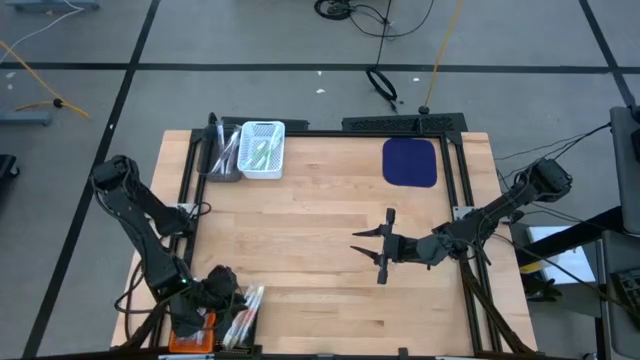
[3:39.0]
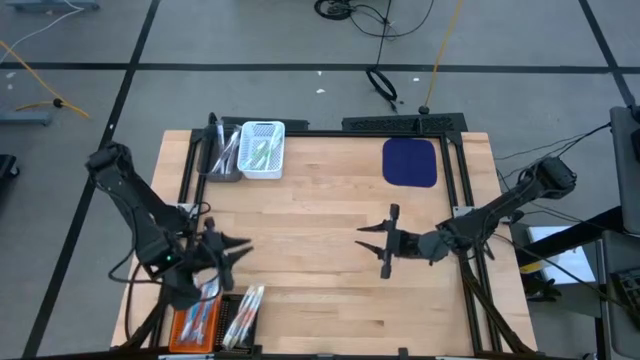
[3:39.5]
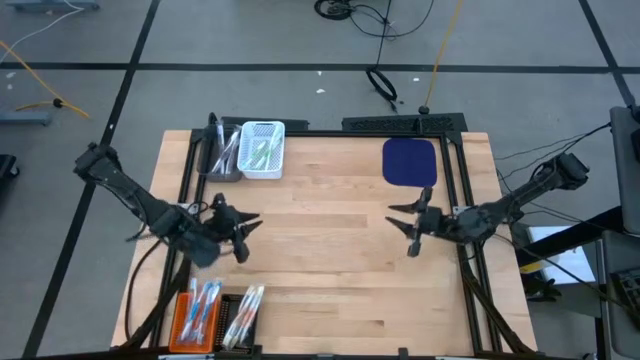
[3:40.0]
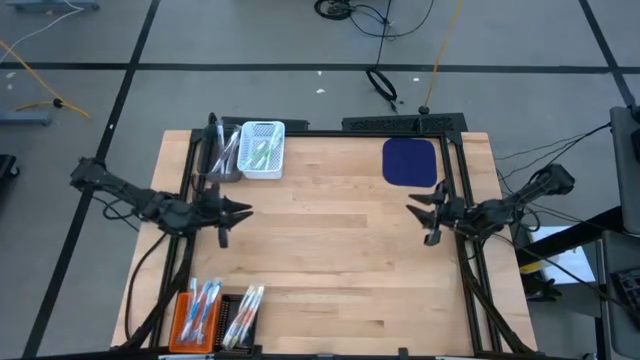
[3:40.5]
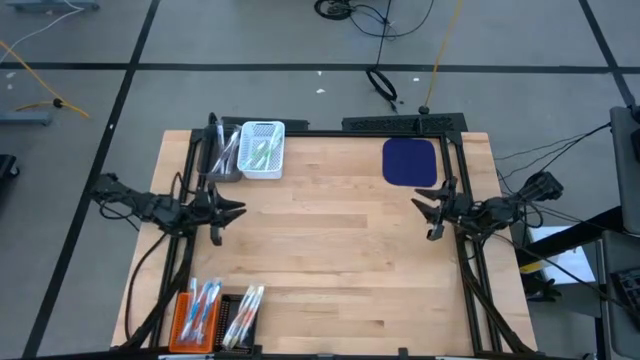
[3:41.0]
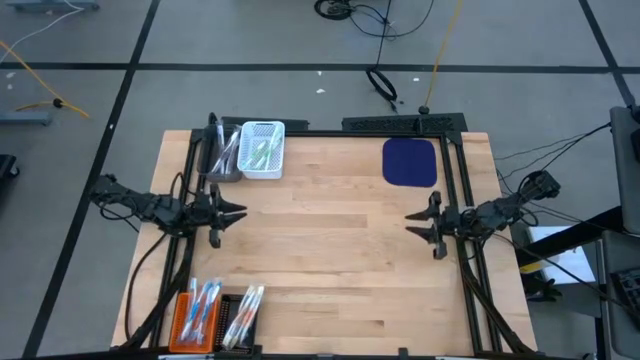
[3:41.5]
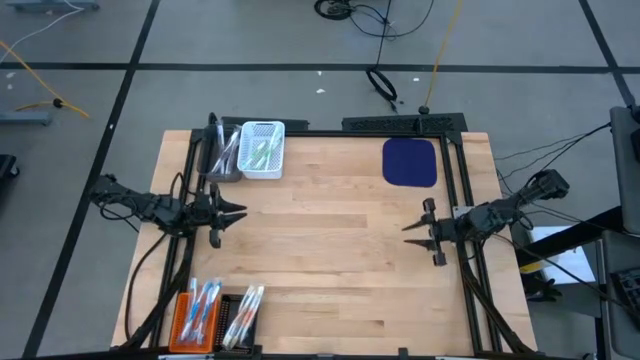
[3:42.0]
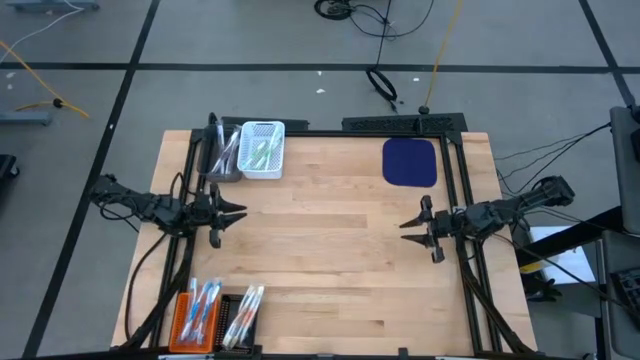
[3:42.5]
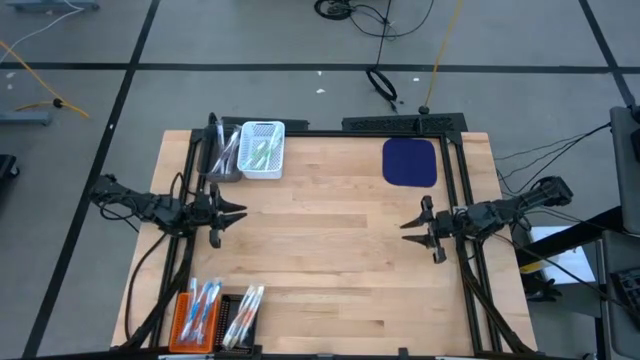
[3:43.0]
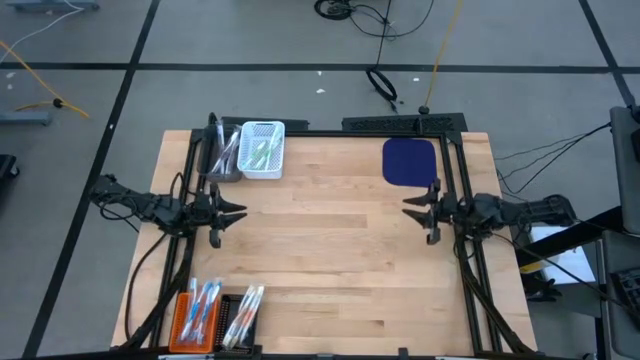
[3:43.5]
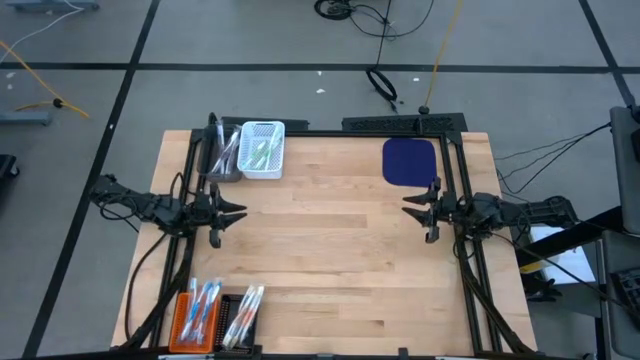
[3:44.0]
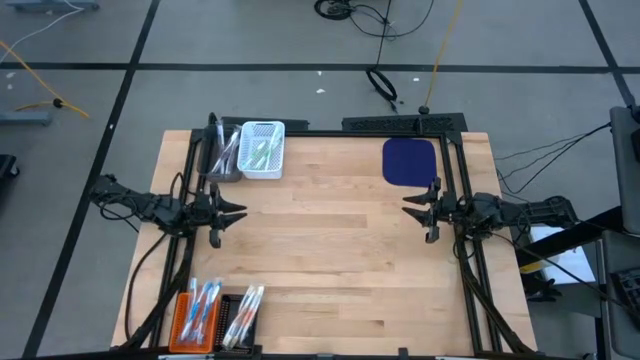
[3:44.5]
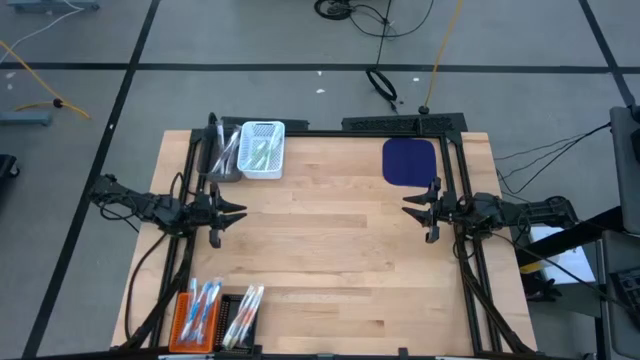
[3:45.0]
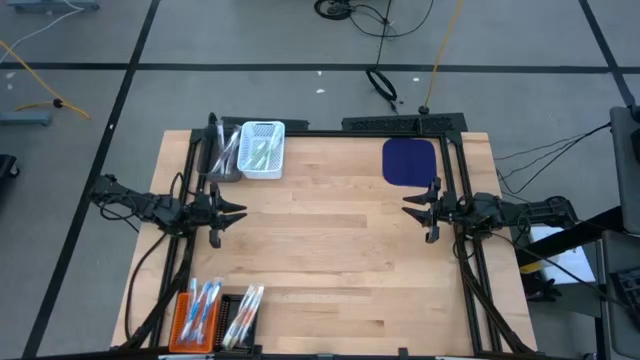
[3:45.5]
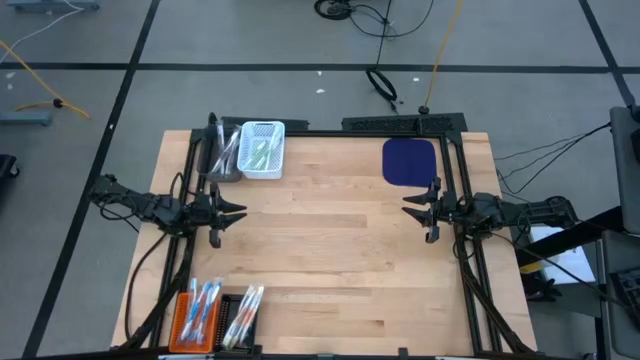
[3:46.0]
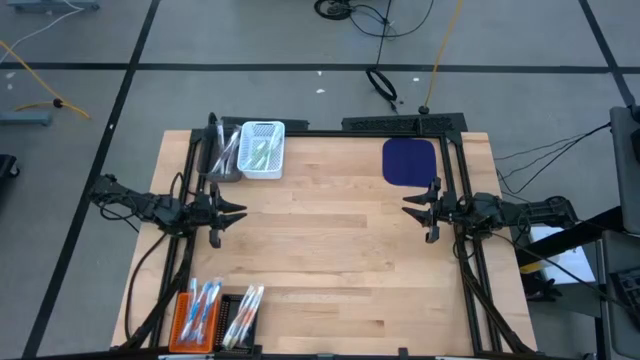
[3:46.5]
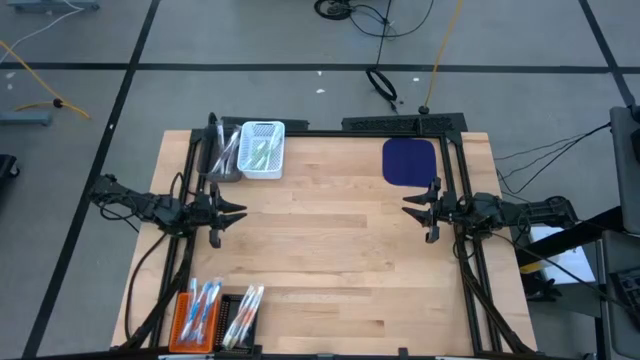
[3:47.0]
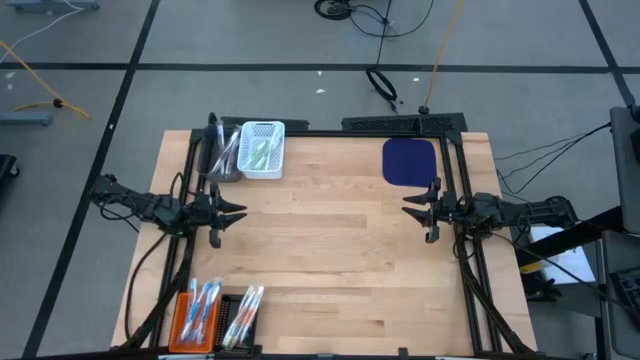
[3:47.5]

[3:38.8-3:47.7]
Task: Pick & Place Toothbrushes
Return to Home Position

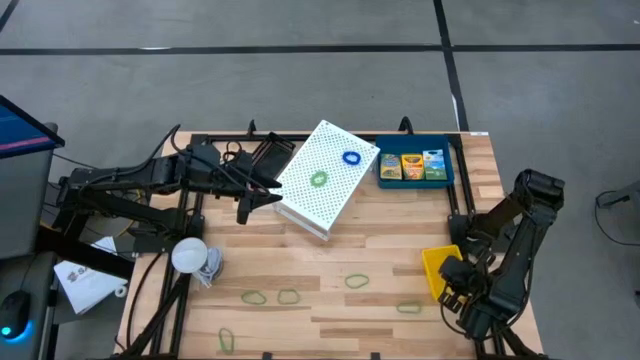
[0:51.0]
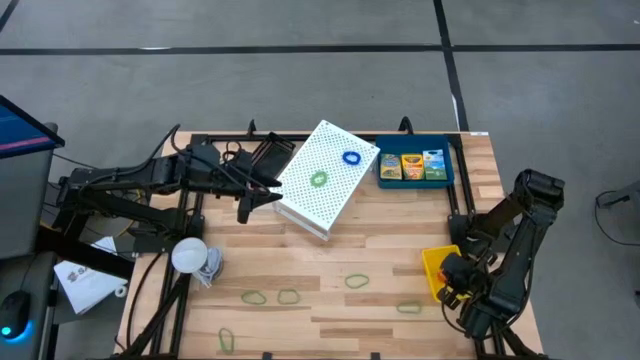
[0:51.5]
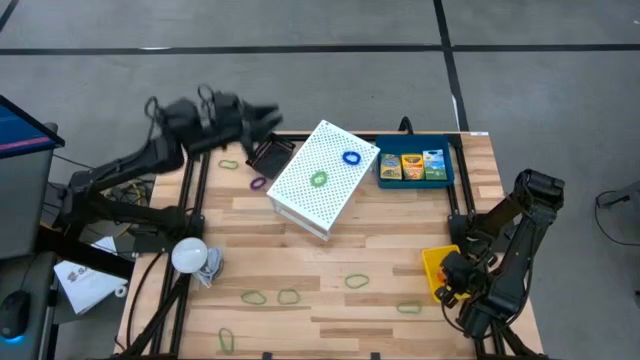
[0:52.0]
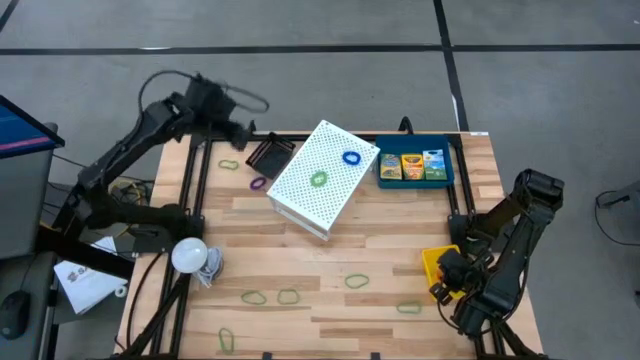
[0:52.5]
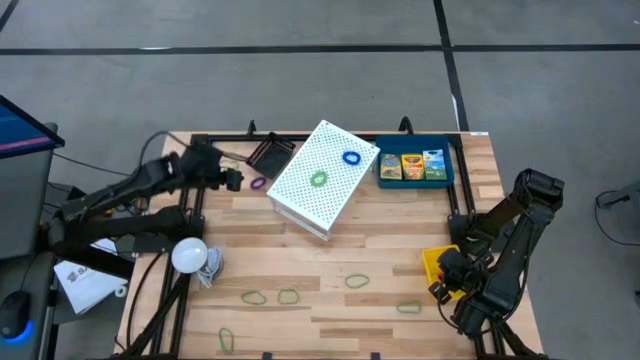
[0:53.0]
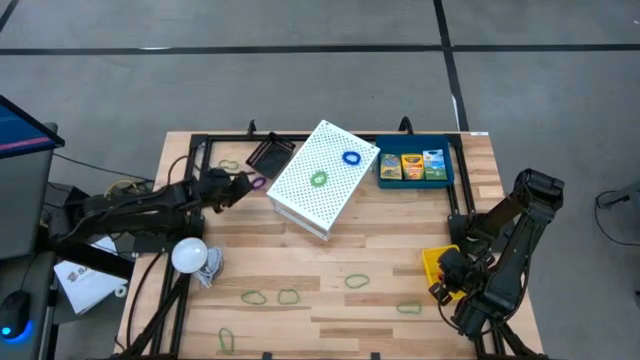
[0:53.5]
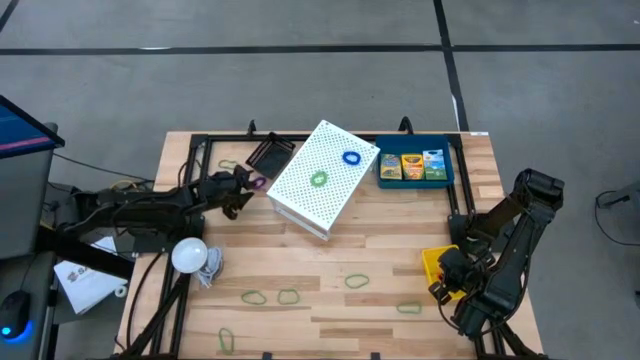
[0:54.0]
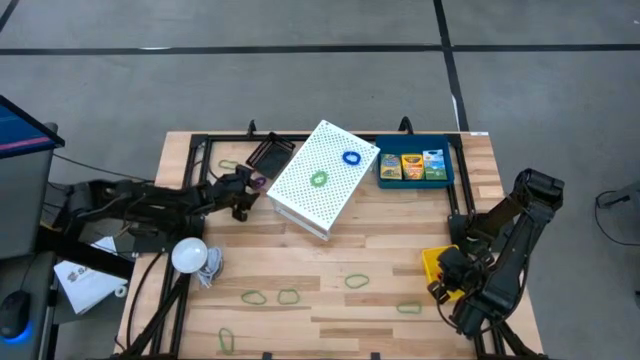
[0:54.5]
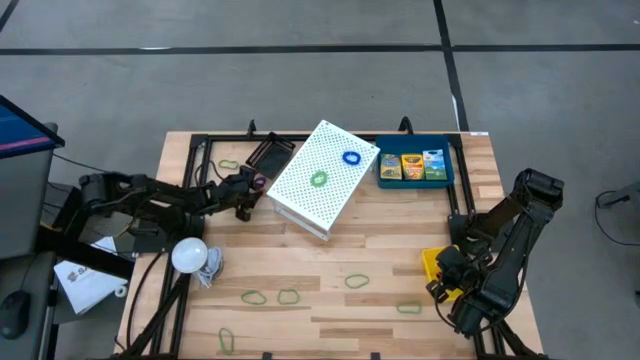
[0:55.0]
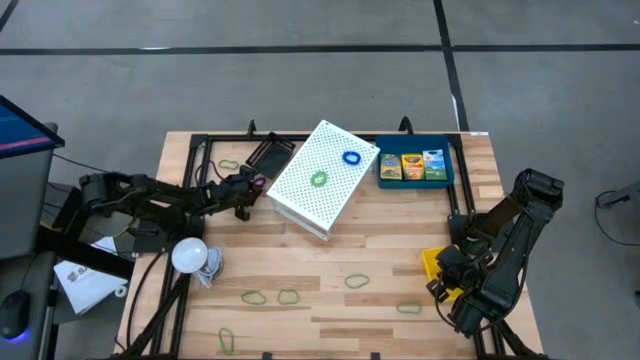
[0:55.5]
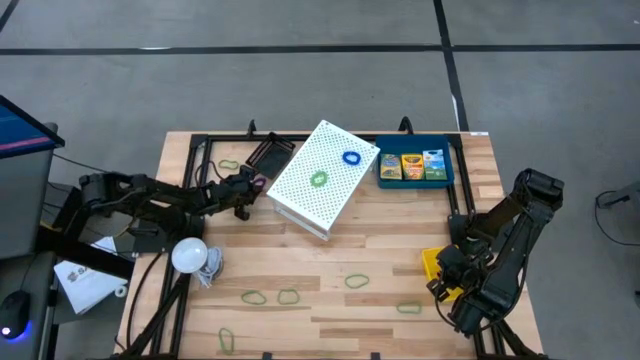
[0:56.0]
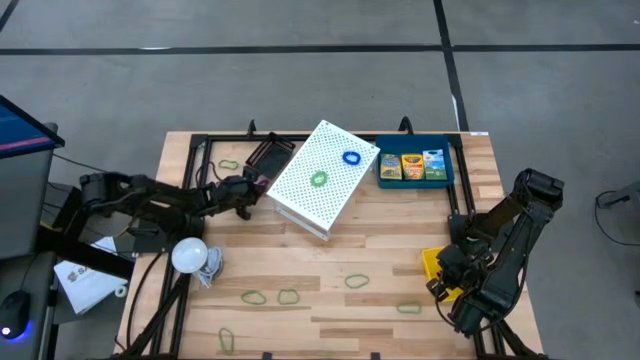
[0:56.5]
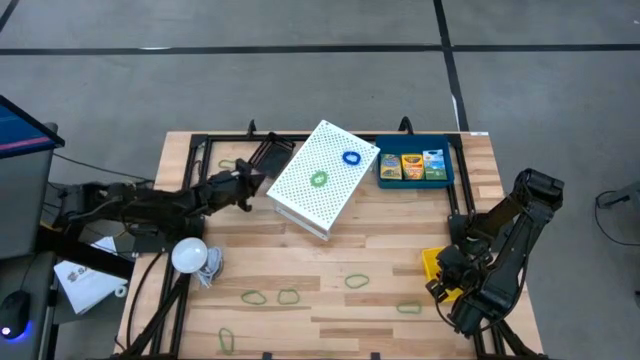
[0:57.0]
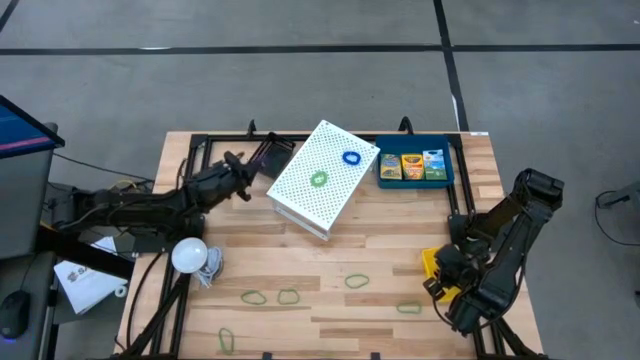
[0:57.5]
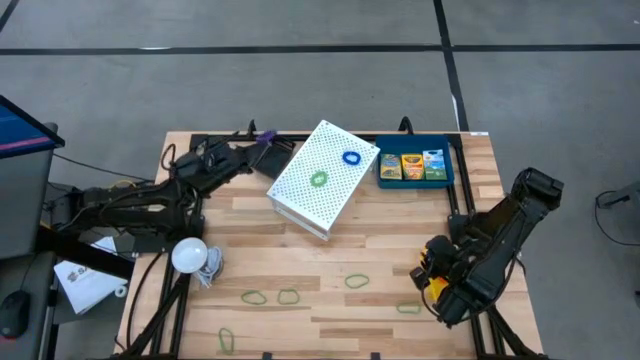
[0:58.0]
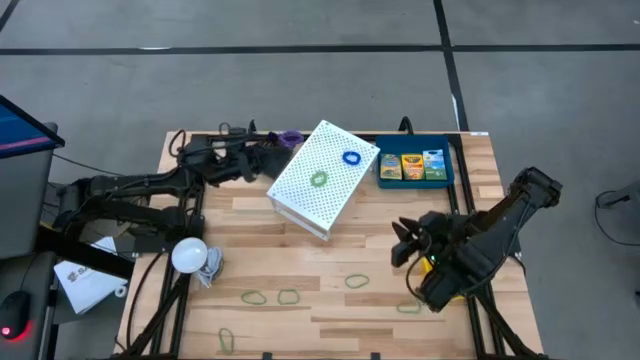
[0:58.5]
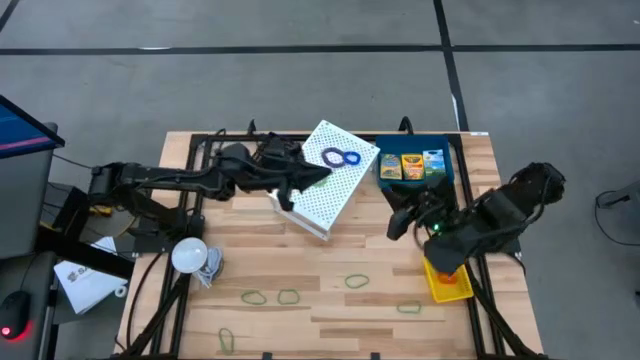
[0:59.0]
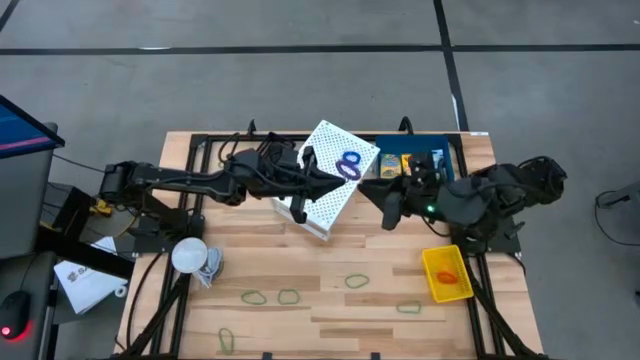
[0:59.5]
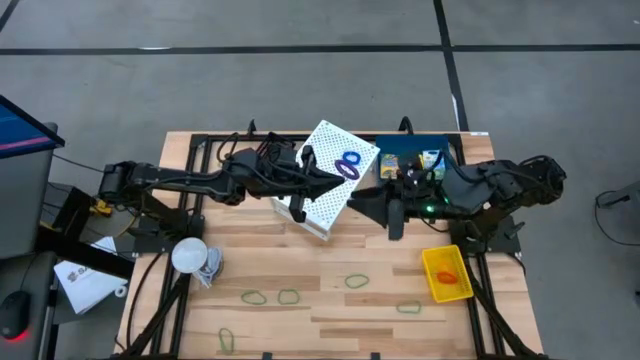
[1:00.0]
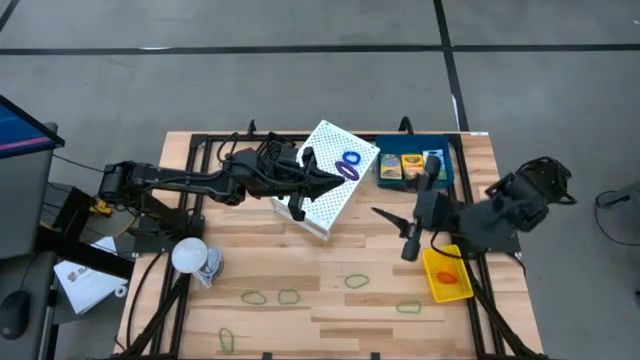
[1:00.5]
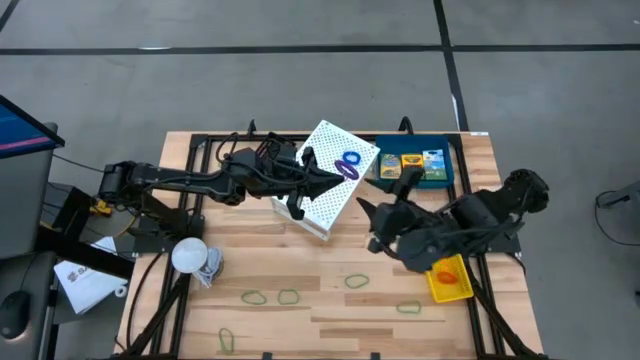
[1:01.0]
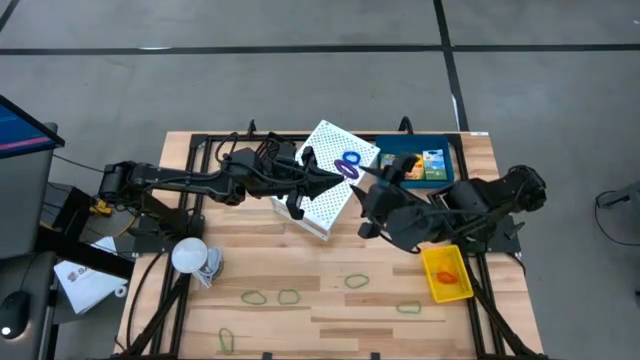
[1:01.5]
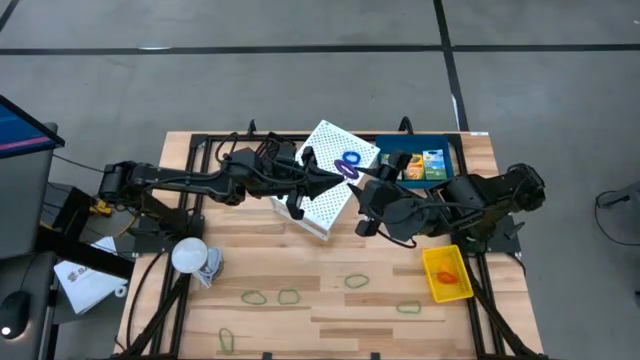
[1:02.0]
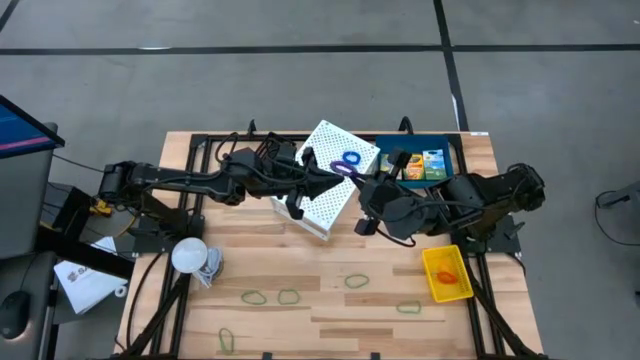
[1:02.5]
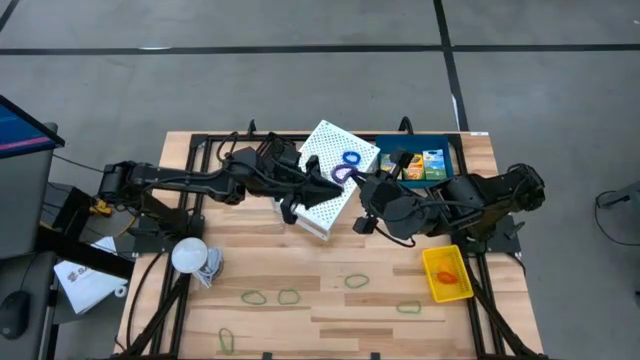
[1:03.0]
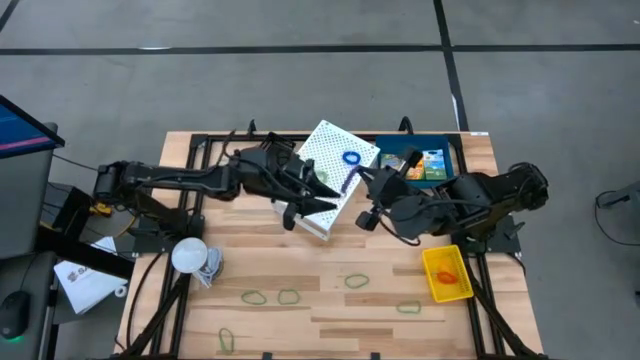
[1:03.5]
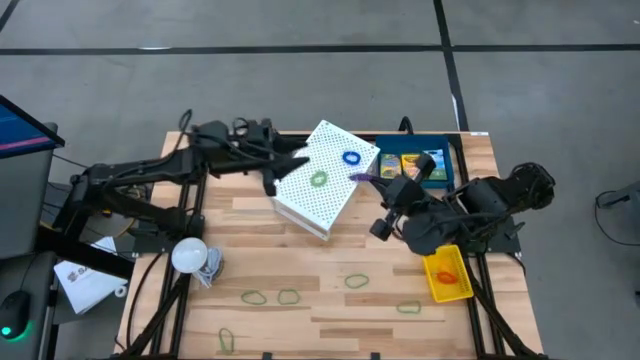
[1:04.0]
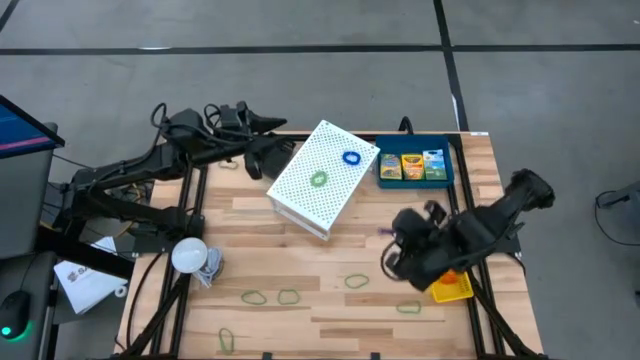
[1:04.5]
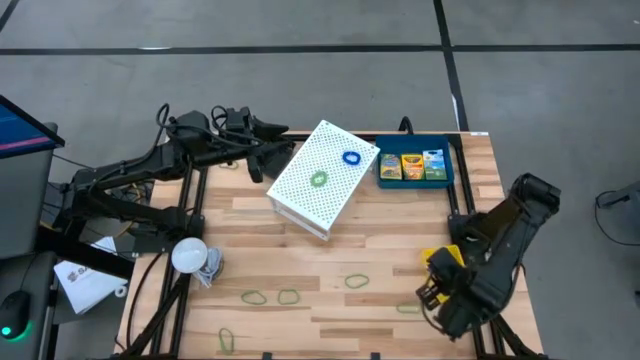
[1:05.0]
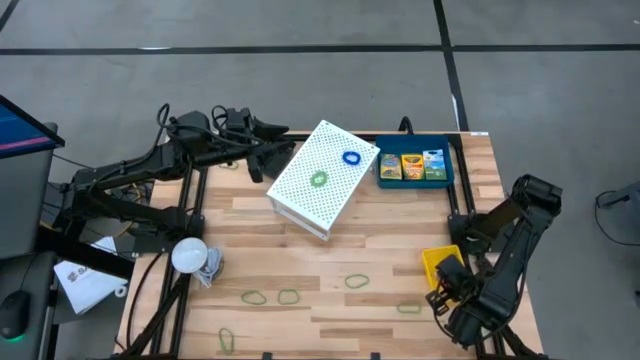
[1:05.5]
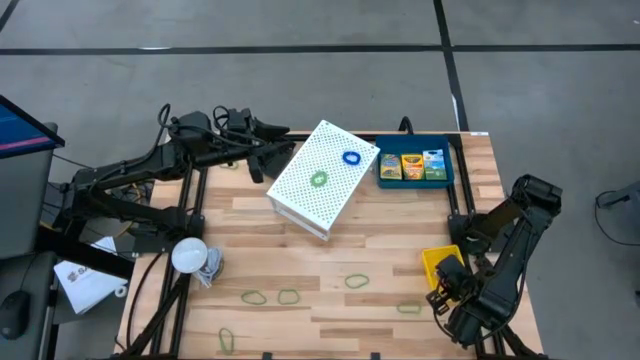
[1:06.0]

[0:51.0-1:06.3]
Task: Pick & Place Office Desk Supplies
Put the purple spring keychain into the yellow bin
